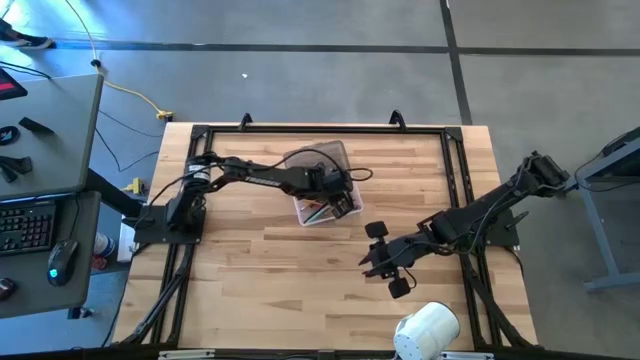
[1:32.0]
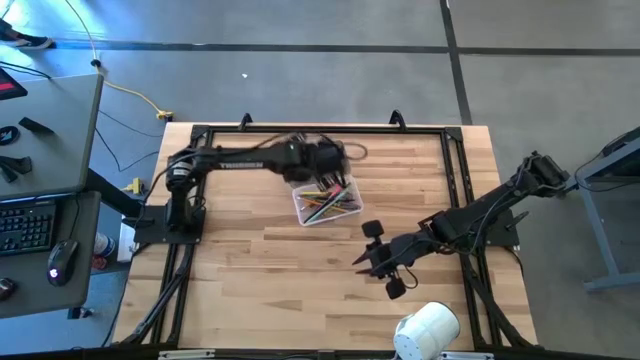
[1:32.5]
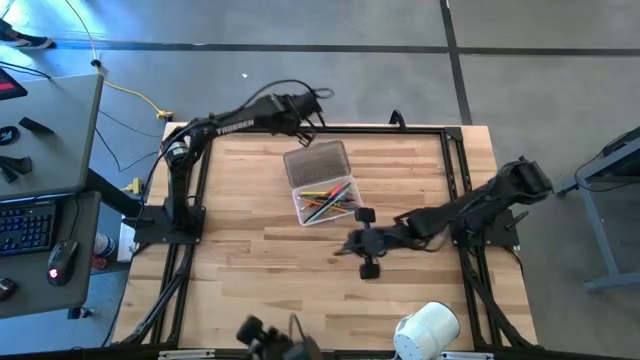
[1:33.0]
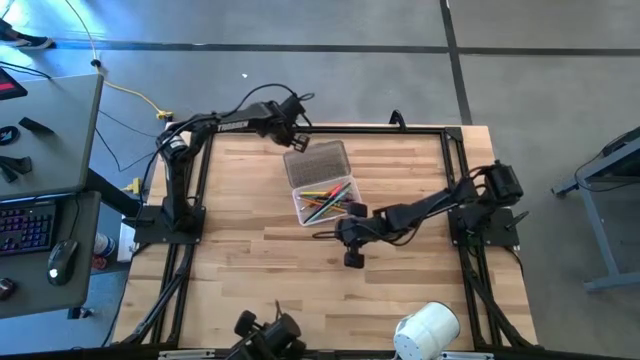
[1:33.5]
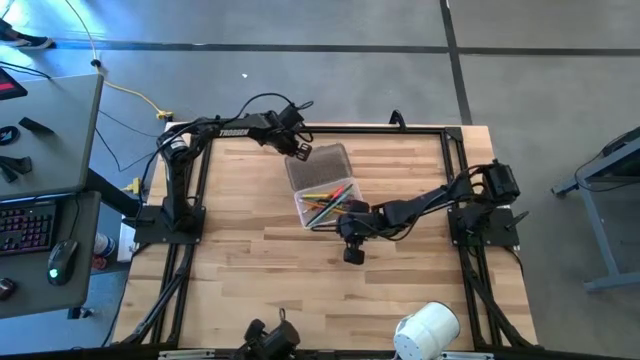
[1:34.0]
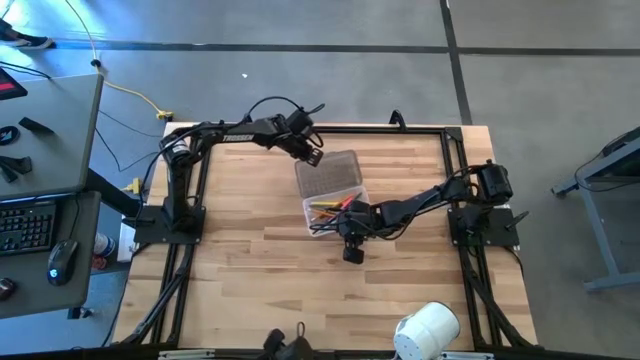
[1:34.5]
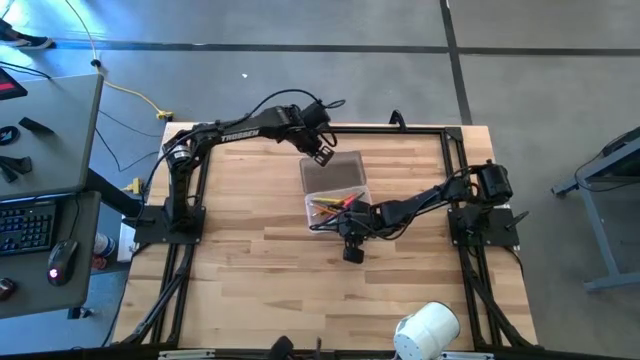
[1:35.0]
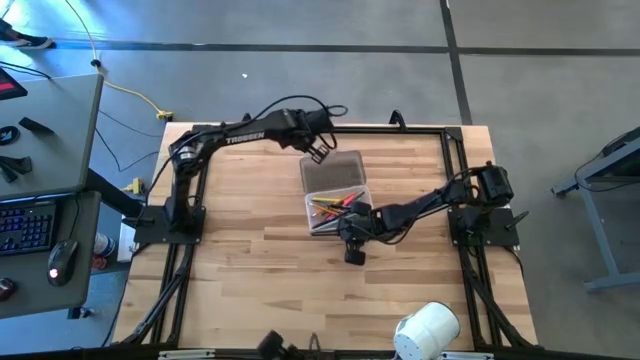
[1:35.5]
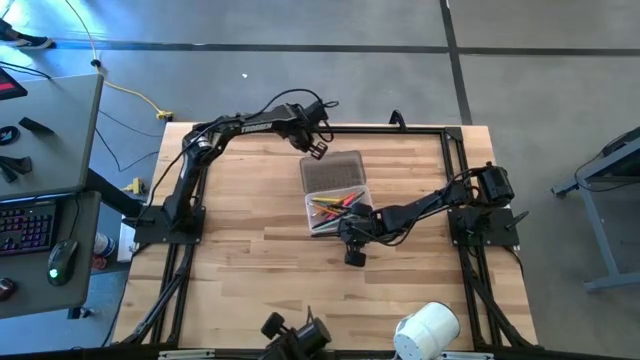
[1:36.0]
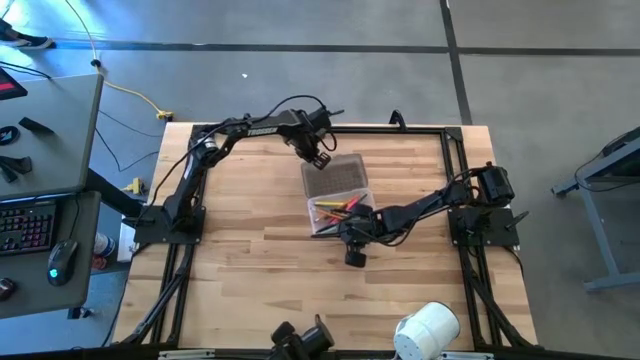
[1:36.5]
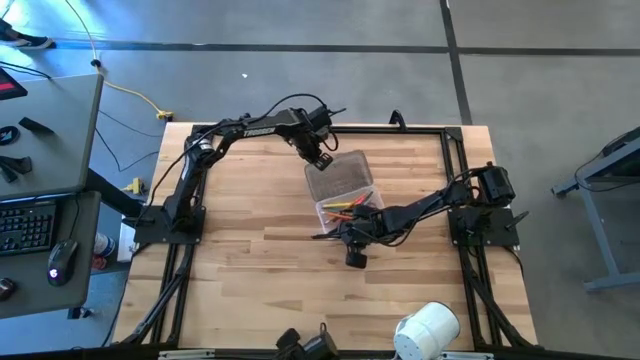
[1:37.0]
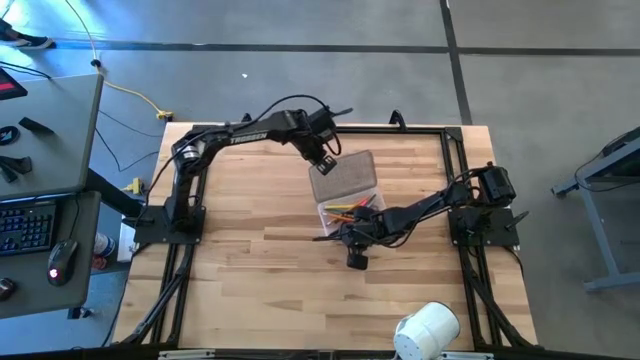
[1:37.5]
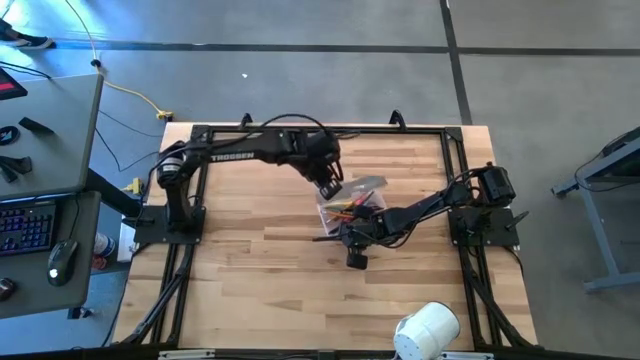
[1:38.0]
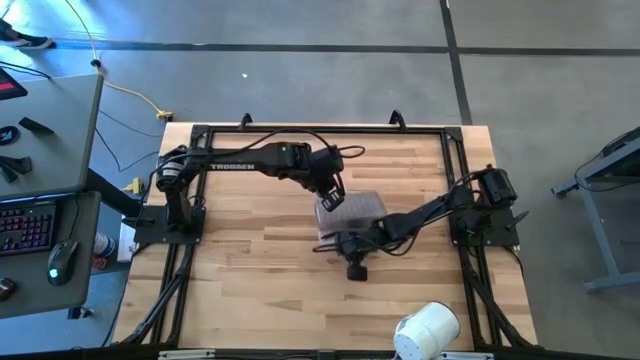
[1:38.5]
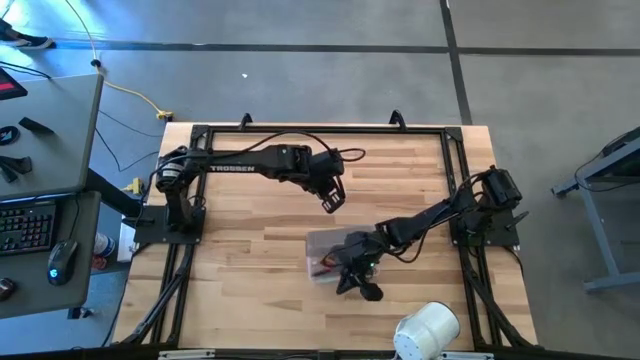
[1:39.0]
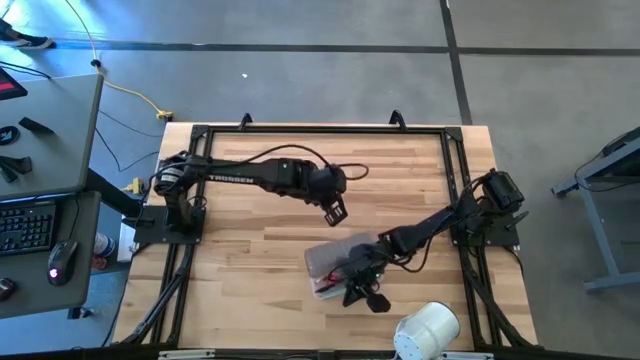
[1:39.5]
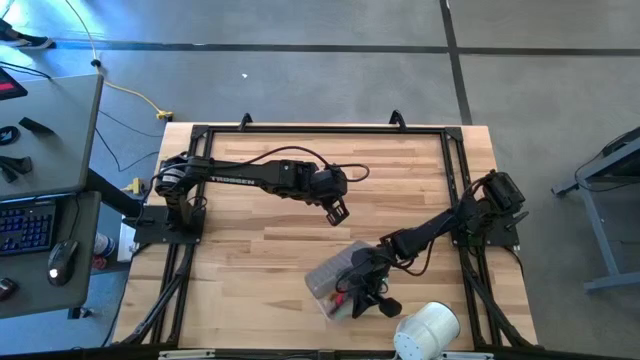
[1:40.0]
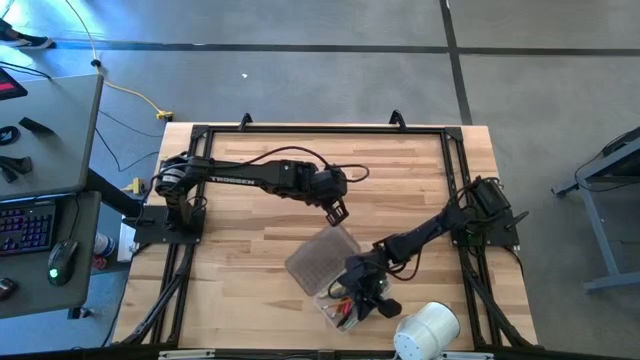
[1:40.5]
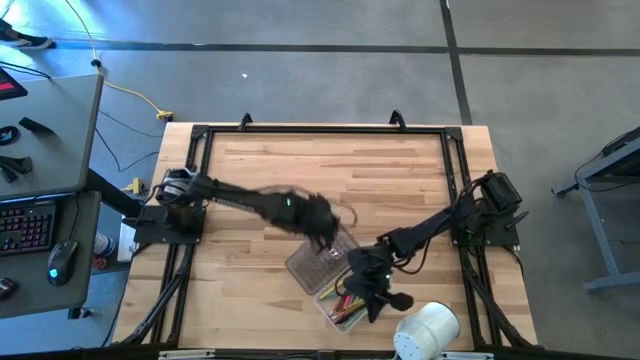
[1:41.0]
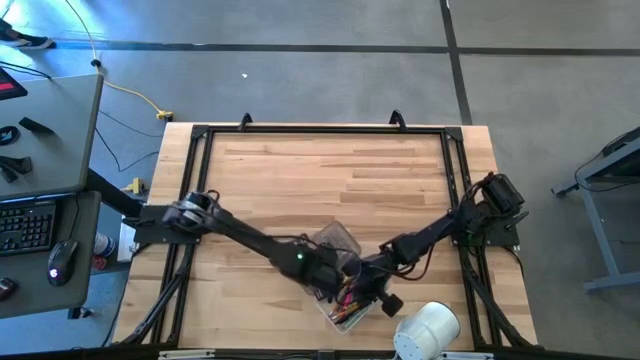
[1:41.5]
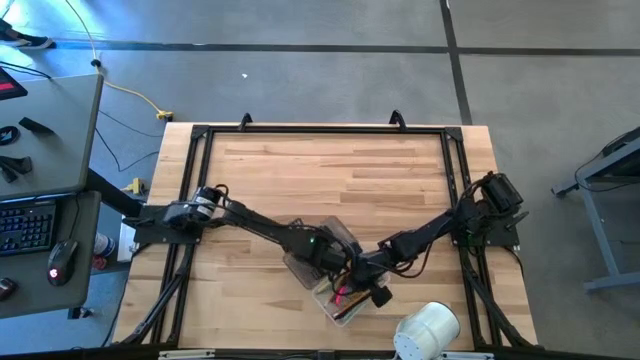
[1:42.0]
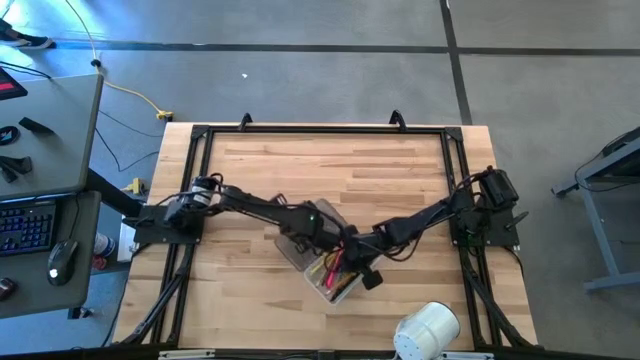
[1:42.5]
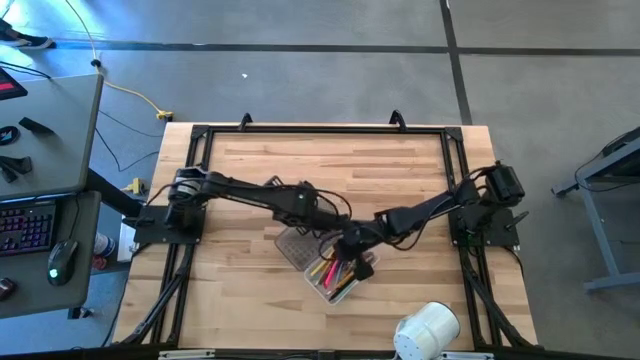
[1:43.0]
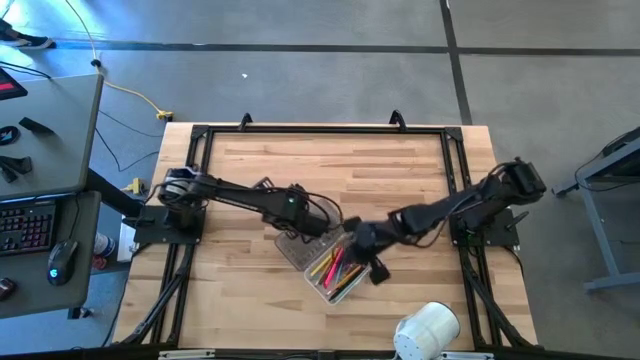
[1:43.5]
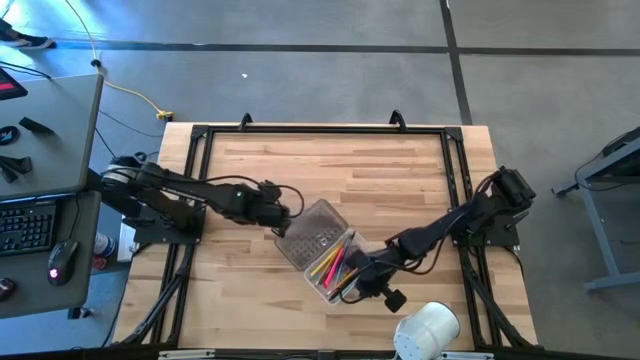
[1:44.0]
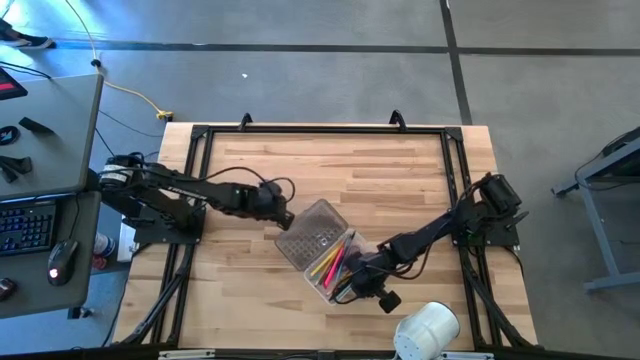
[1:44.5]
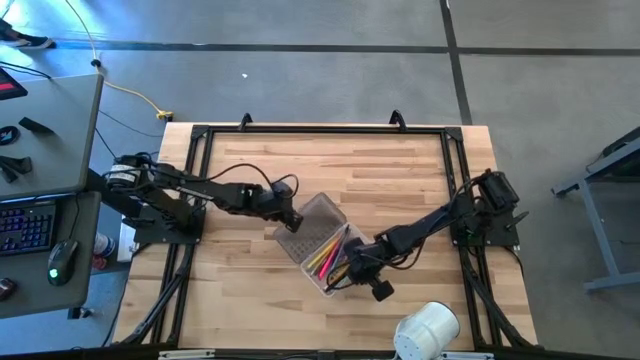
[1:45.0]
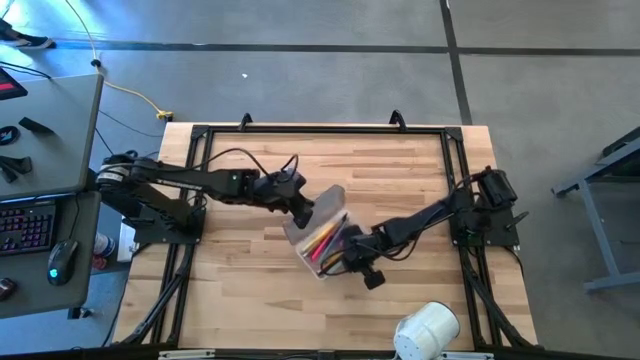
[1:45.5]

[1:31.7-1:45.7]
Task: Pick & place school supplies into a supply box
Close the supply box

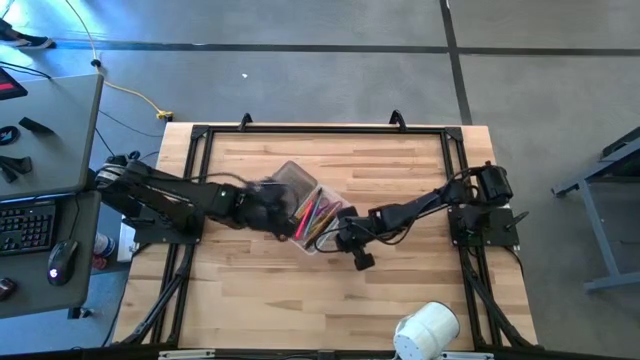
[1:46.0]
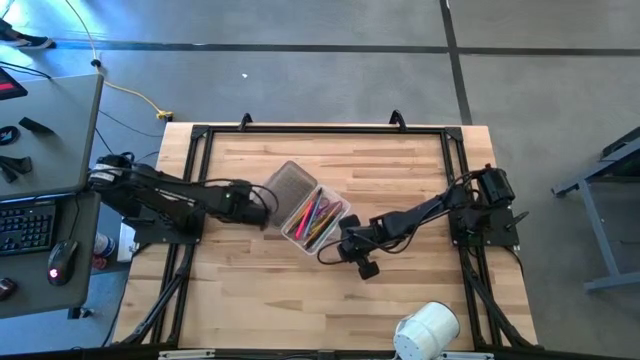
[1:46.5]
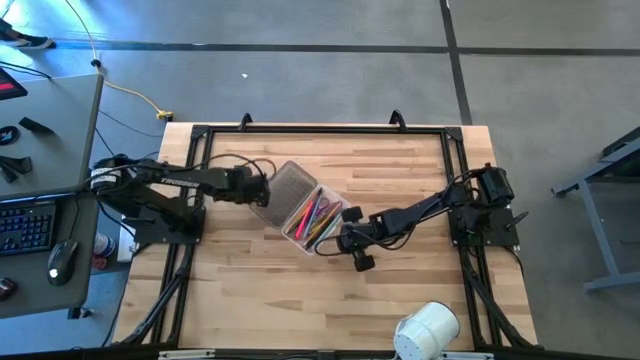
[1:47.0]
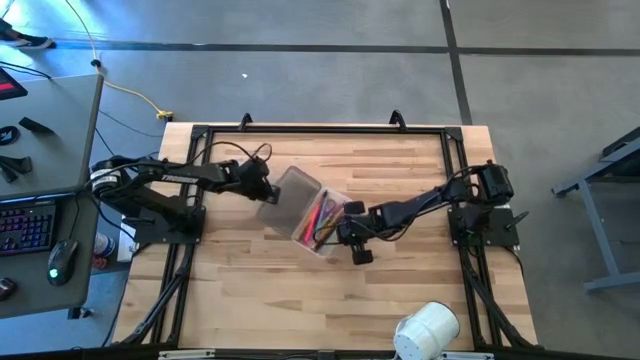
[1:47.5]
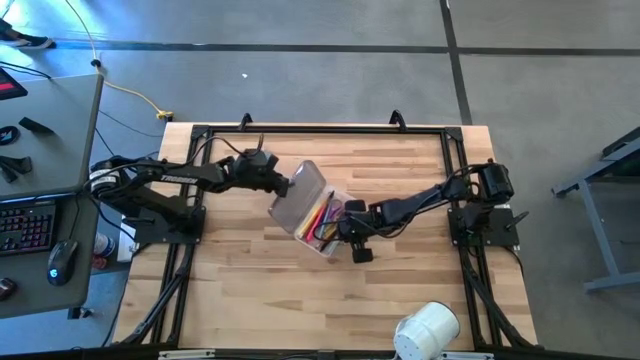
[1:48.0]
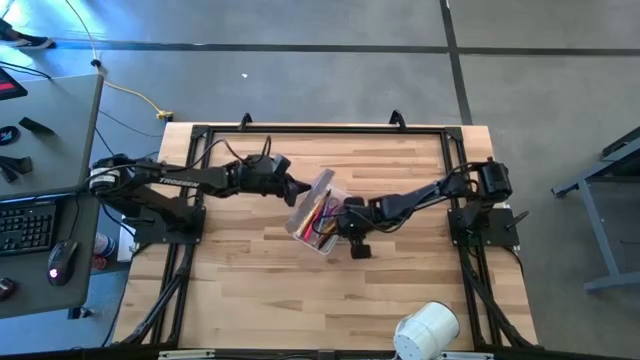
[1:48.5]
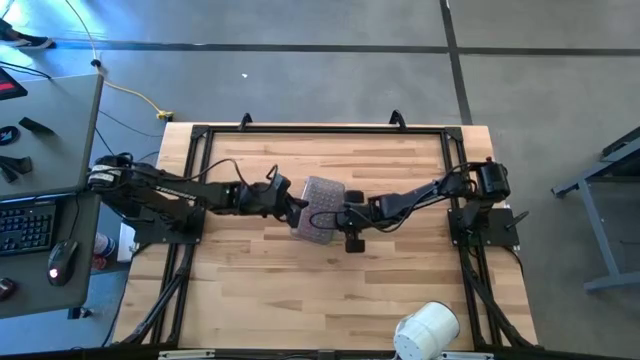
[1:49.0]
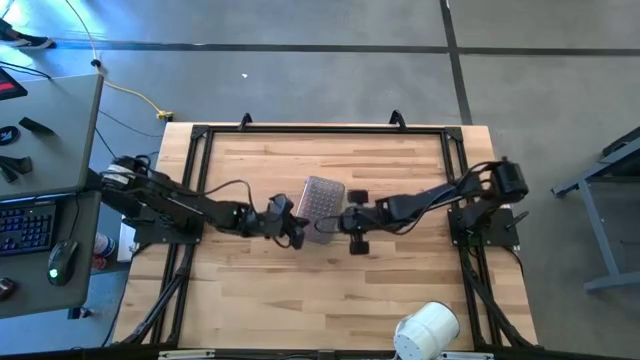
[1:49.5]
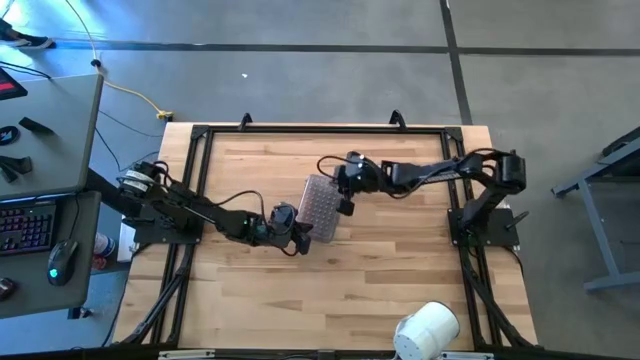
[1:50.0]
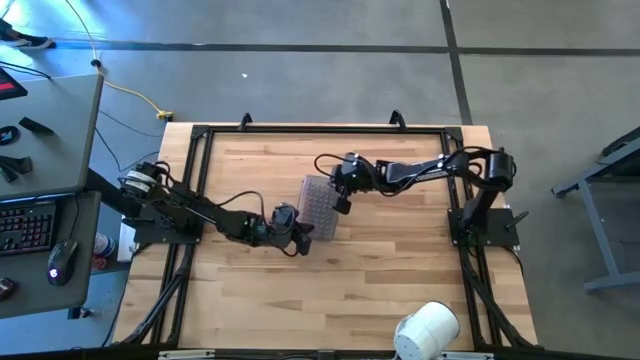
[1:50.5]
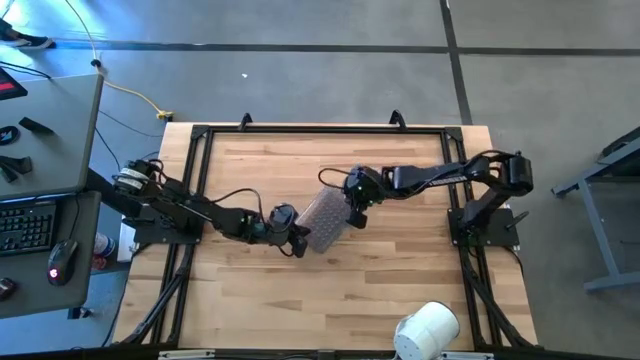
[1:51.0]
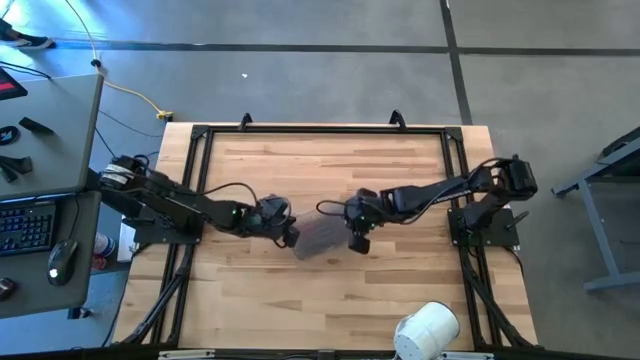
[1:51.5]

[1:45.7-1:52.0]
Close the supply box

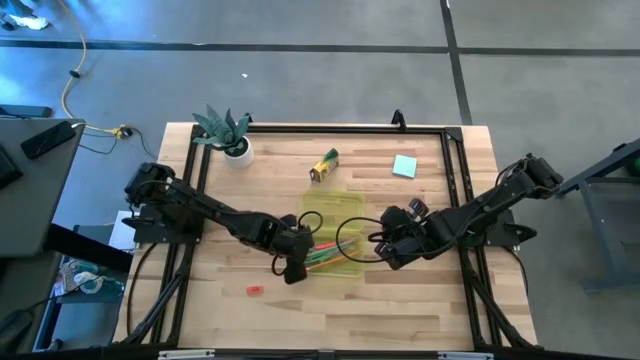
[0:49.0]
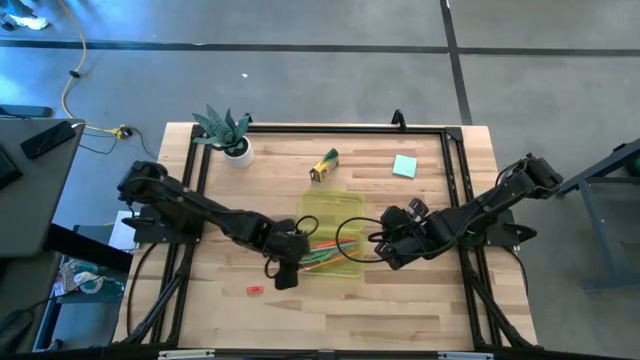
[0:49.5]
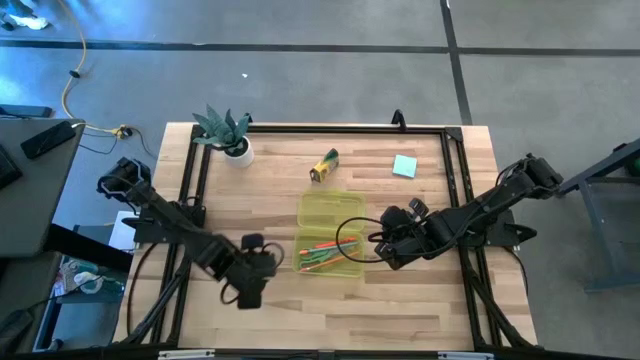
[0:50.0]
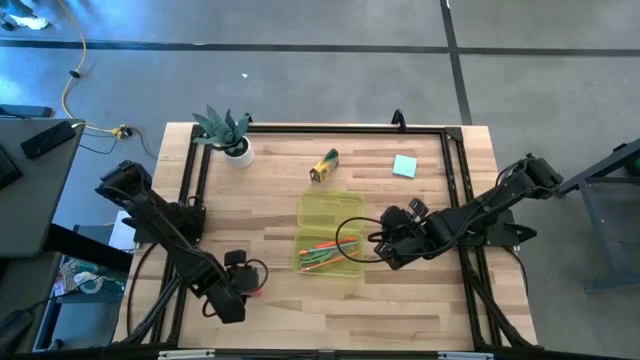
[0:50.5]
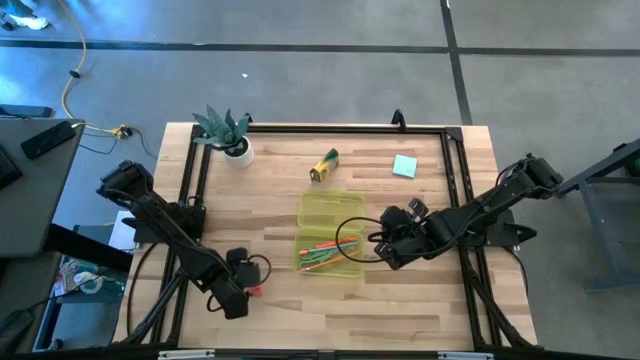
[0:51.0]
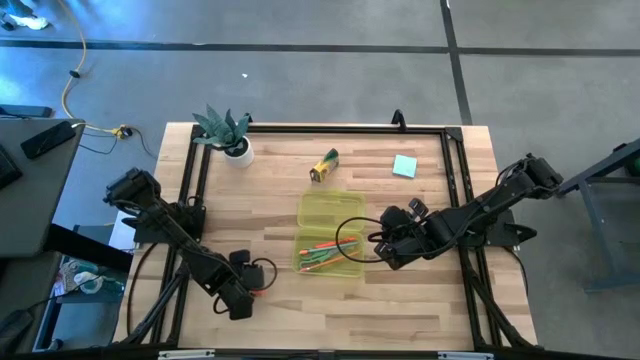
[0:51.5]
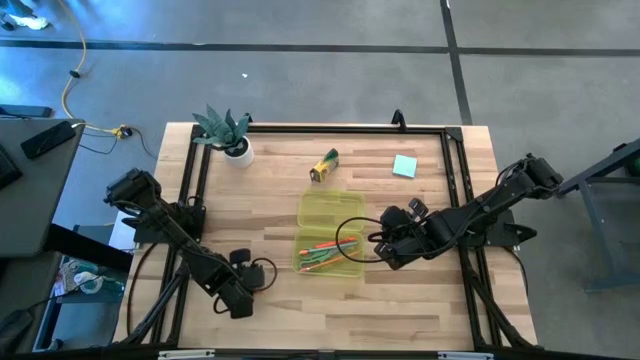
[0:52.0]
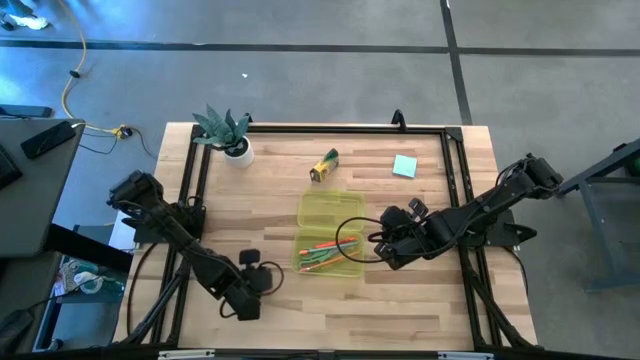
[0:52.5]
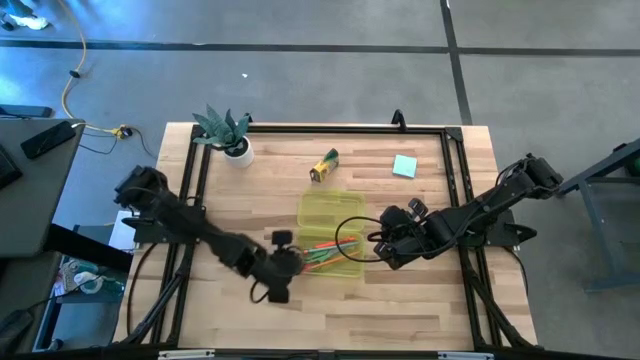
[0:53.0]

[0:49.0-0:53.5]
Task: Pack school essentials
Put the orange eraser into the yellow box
